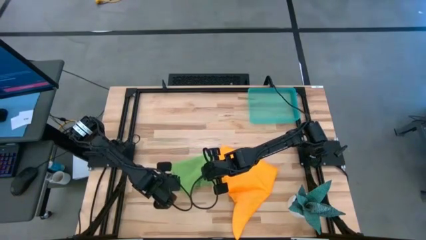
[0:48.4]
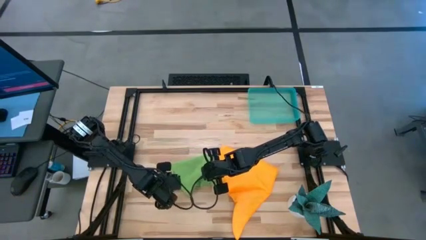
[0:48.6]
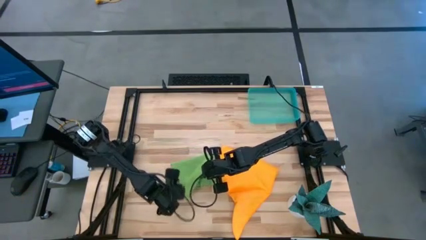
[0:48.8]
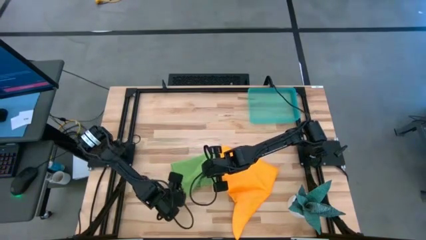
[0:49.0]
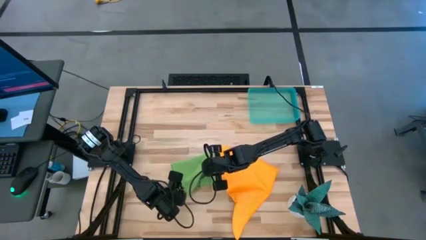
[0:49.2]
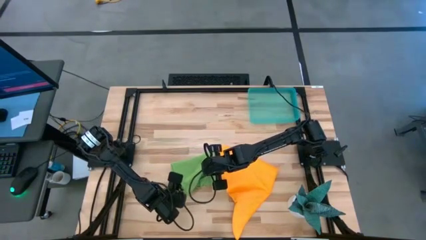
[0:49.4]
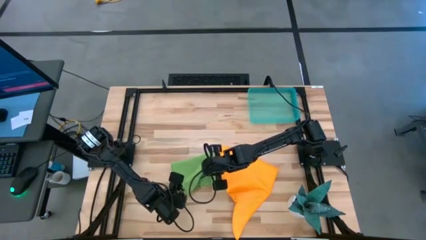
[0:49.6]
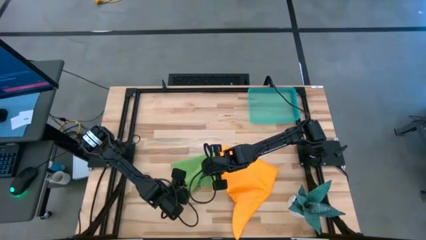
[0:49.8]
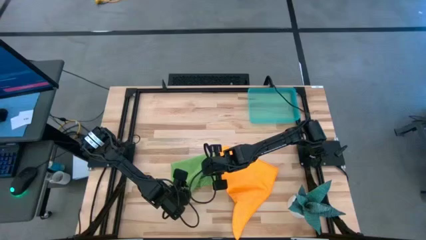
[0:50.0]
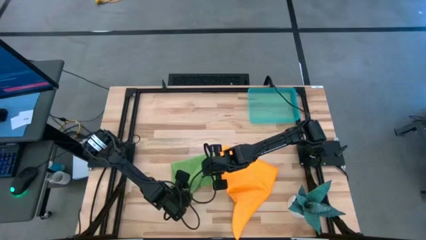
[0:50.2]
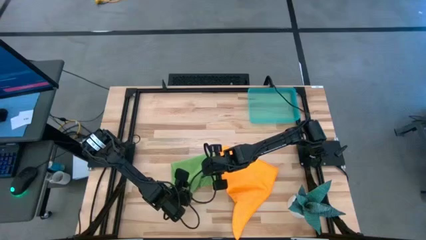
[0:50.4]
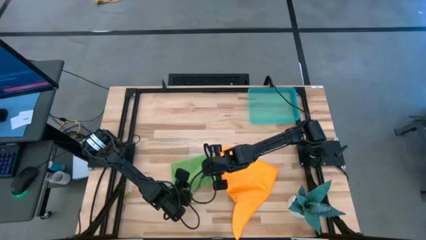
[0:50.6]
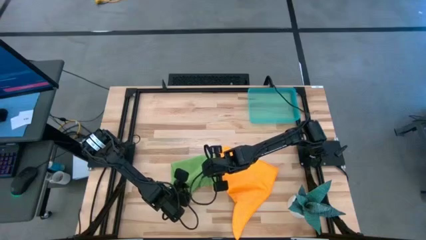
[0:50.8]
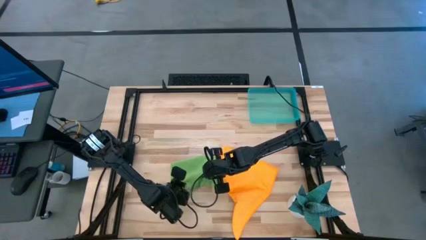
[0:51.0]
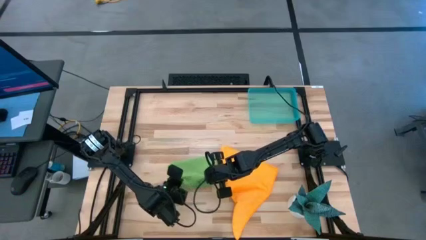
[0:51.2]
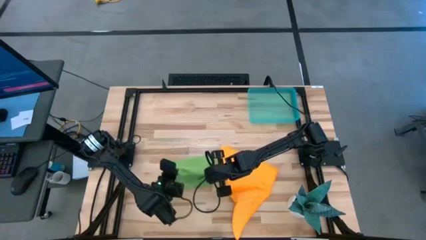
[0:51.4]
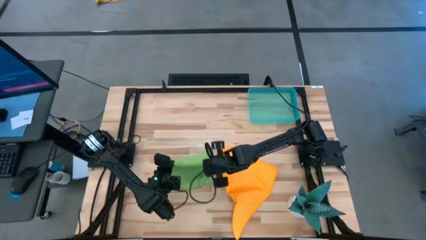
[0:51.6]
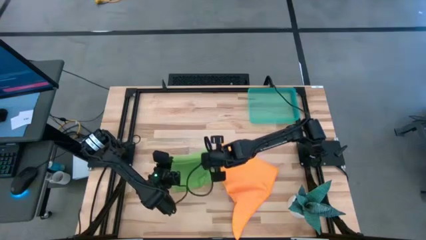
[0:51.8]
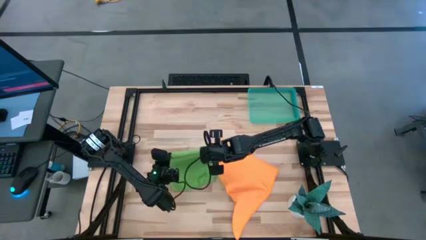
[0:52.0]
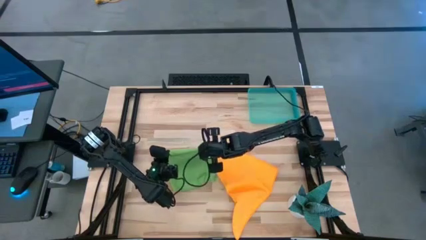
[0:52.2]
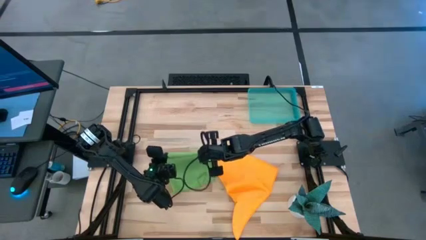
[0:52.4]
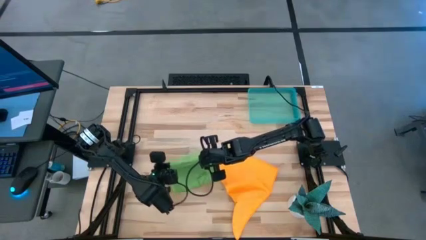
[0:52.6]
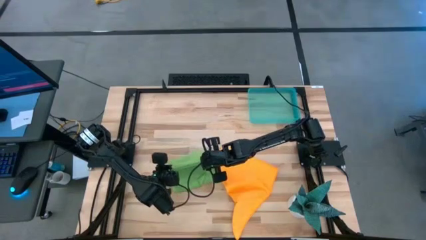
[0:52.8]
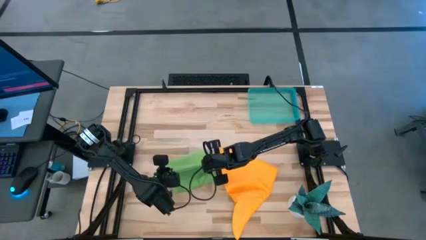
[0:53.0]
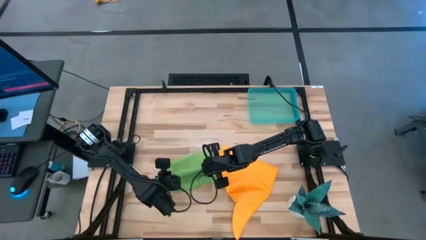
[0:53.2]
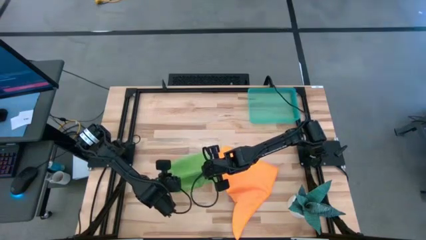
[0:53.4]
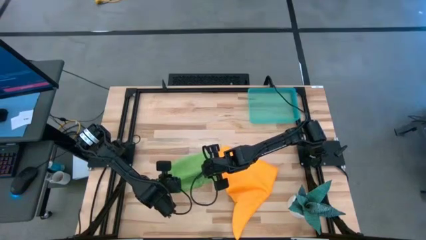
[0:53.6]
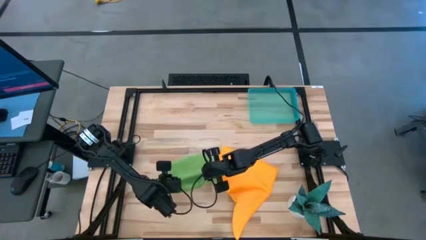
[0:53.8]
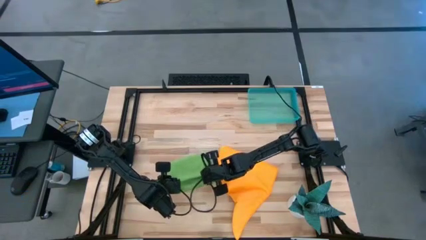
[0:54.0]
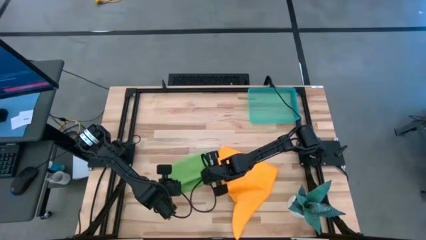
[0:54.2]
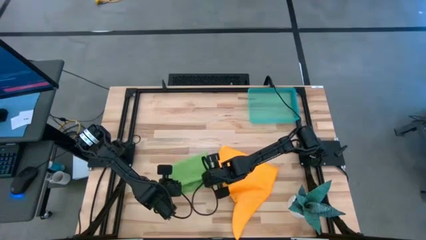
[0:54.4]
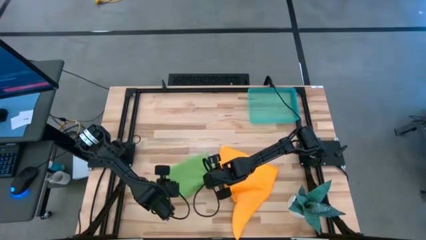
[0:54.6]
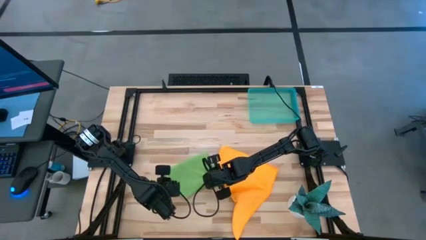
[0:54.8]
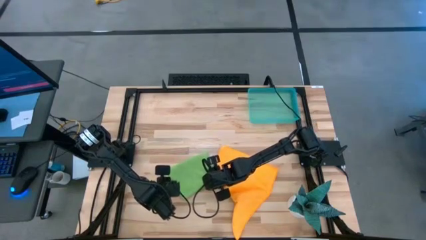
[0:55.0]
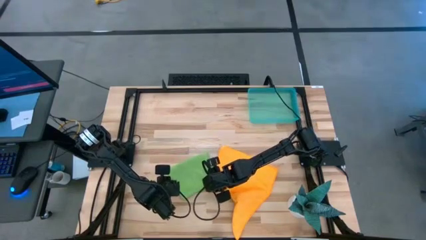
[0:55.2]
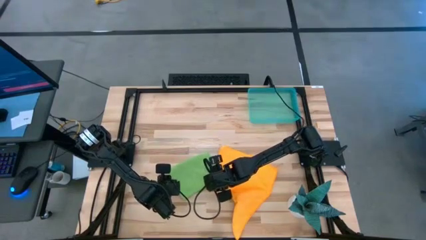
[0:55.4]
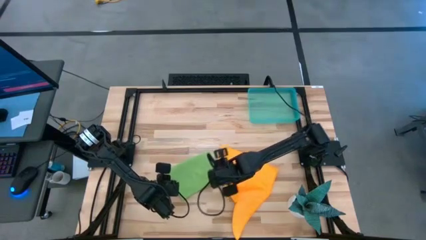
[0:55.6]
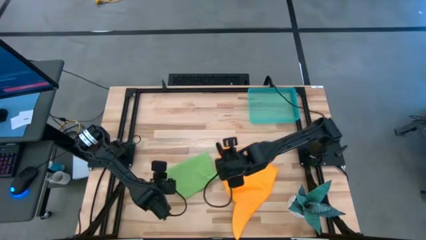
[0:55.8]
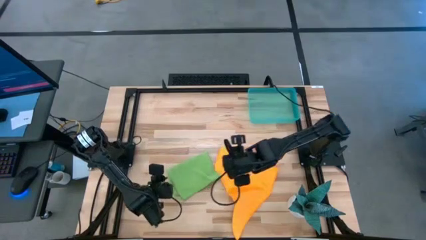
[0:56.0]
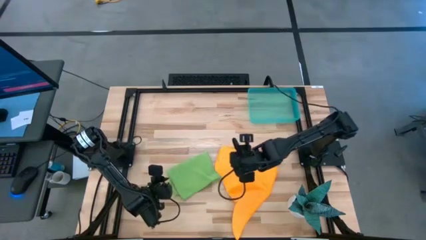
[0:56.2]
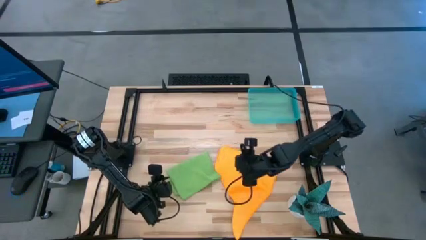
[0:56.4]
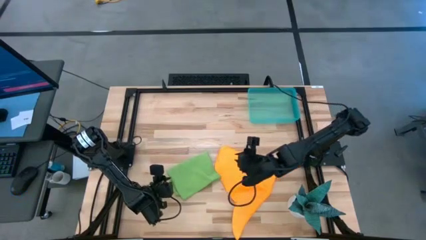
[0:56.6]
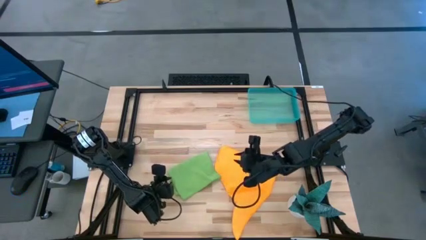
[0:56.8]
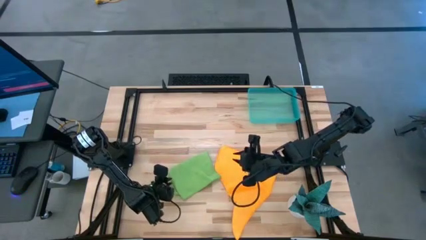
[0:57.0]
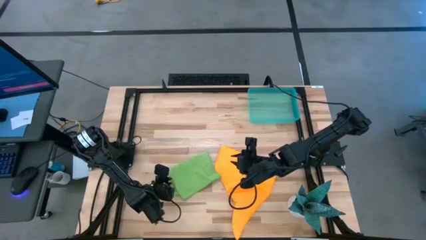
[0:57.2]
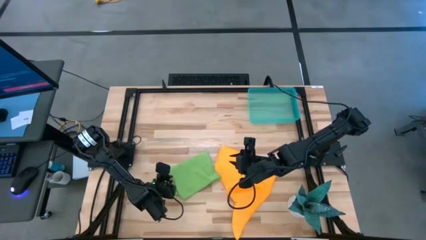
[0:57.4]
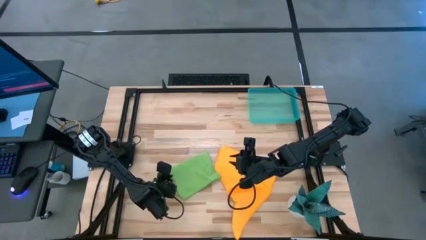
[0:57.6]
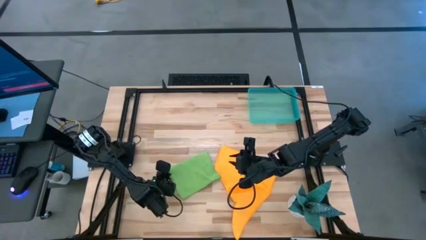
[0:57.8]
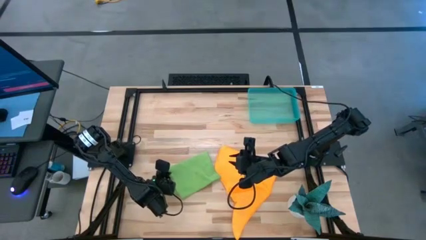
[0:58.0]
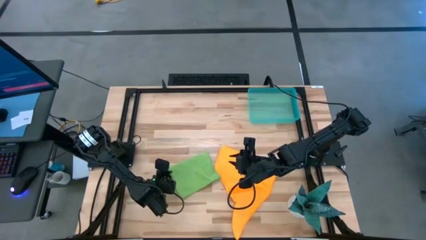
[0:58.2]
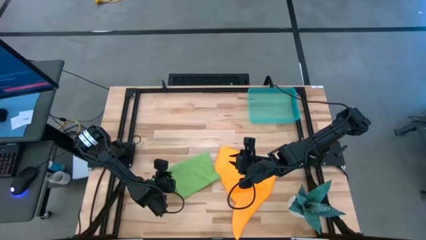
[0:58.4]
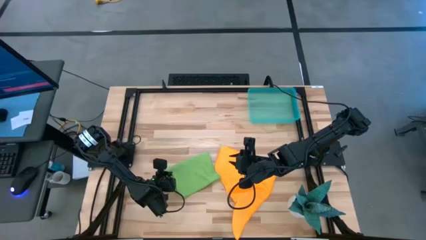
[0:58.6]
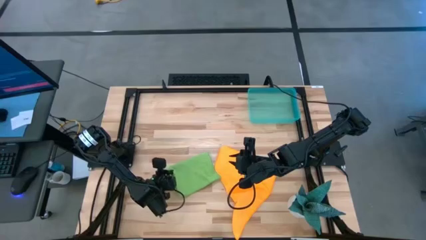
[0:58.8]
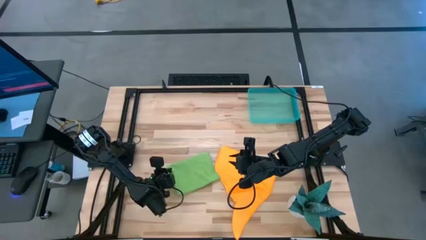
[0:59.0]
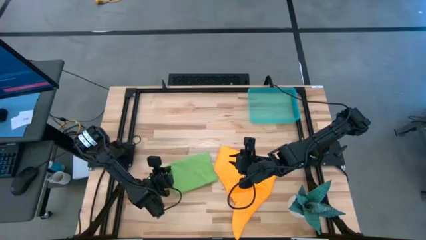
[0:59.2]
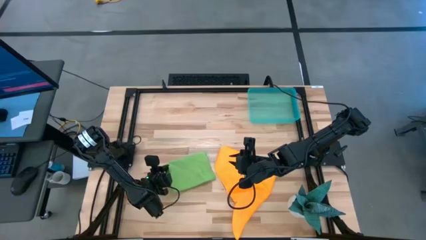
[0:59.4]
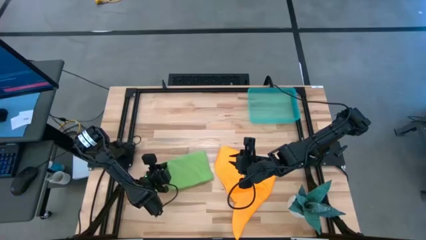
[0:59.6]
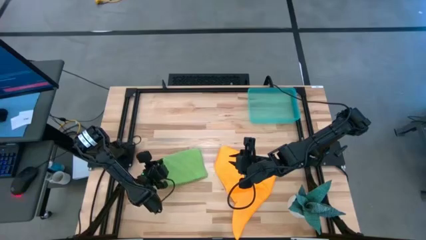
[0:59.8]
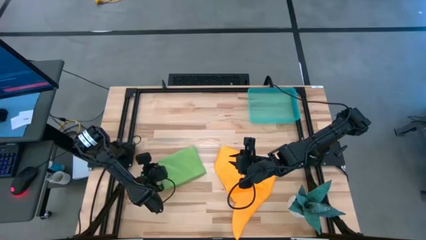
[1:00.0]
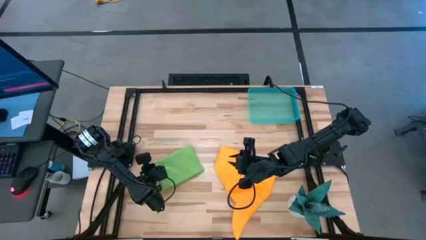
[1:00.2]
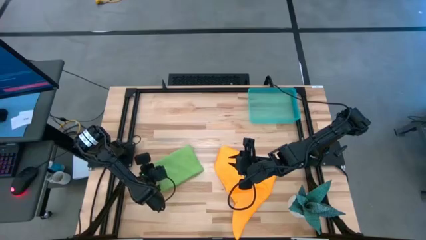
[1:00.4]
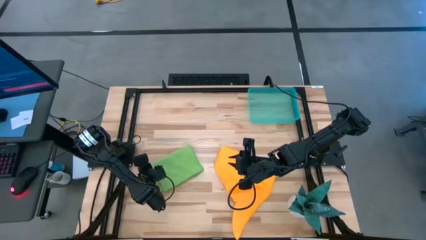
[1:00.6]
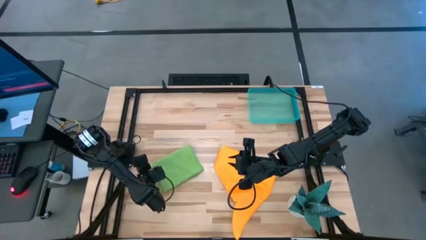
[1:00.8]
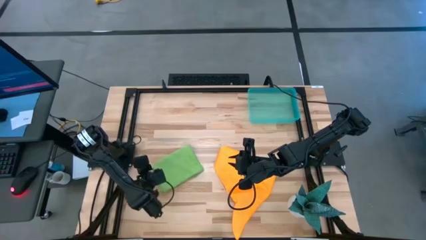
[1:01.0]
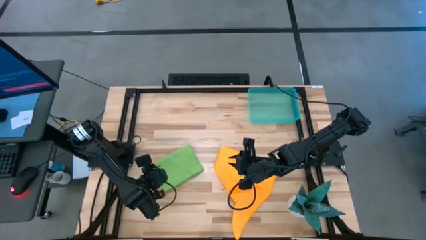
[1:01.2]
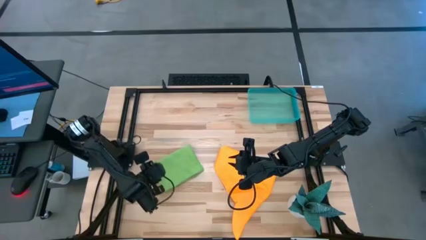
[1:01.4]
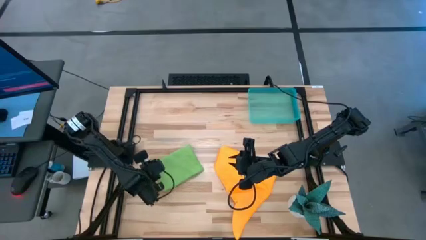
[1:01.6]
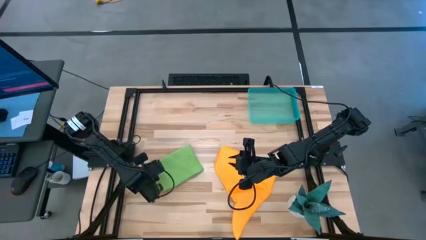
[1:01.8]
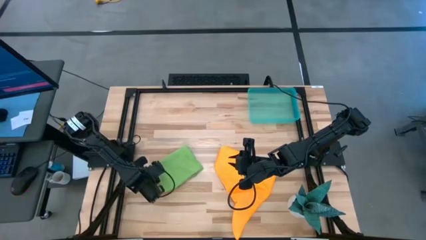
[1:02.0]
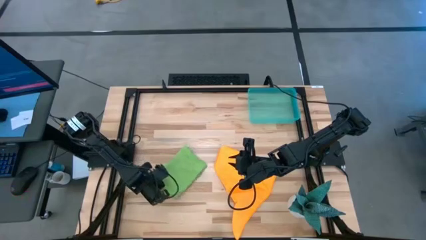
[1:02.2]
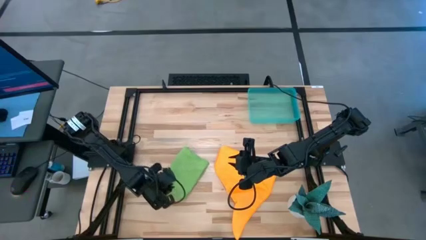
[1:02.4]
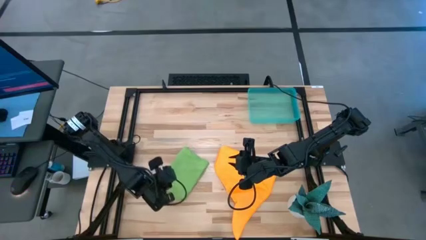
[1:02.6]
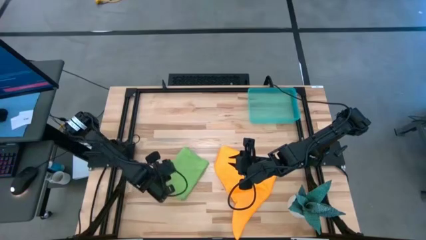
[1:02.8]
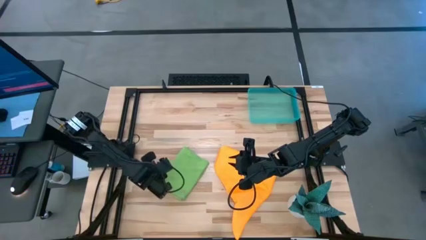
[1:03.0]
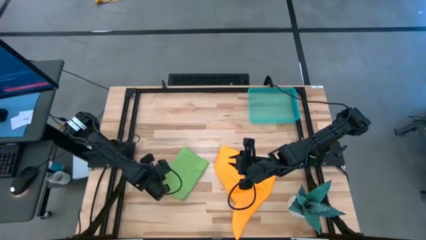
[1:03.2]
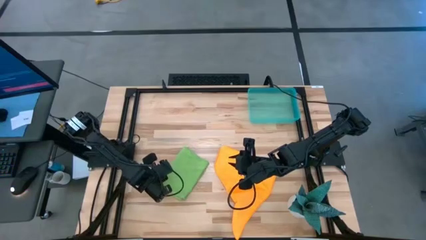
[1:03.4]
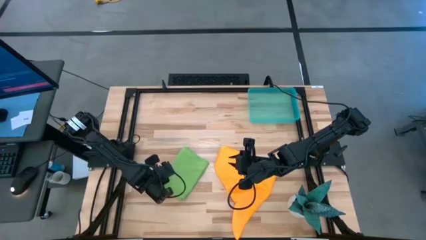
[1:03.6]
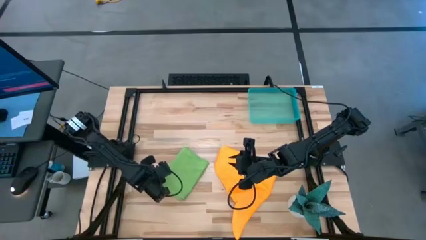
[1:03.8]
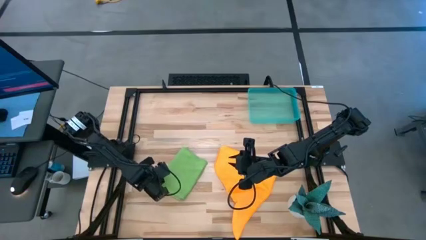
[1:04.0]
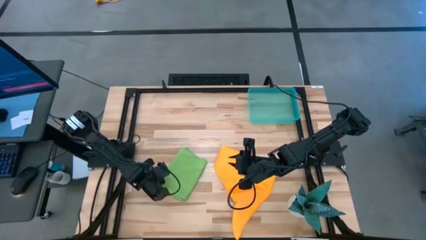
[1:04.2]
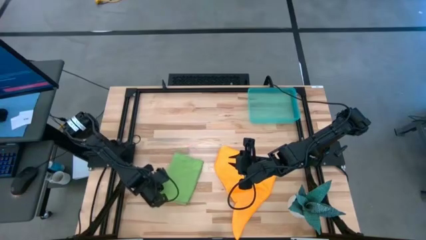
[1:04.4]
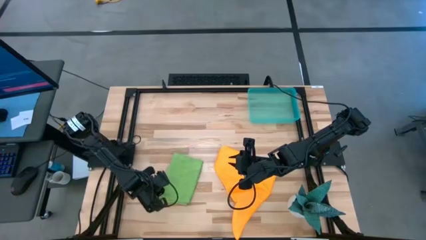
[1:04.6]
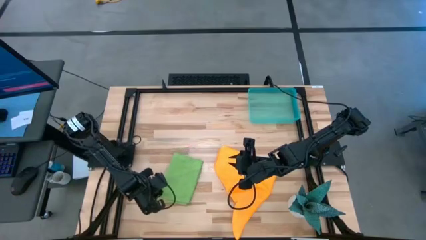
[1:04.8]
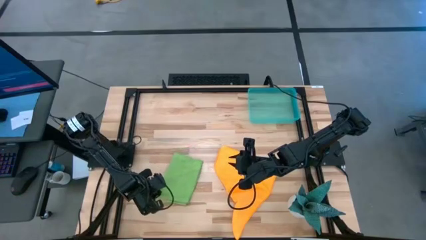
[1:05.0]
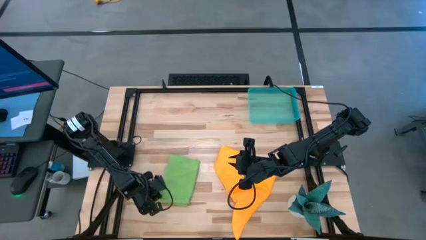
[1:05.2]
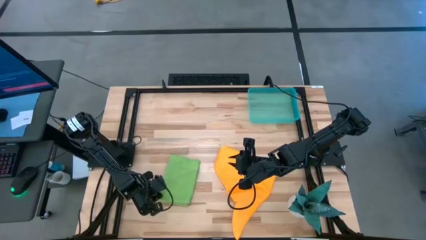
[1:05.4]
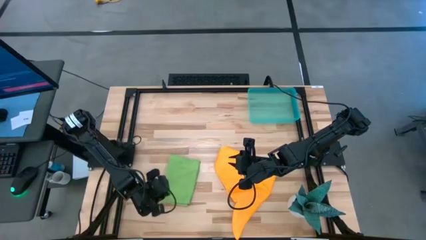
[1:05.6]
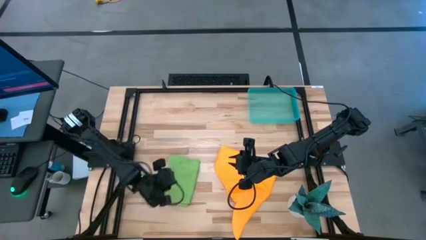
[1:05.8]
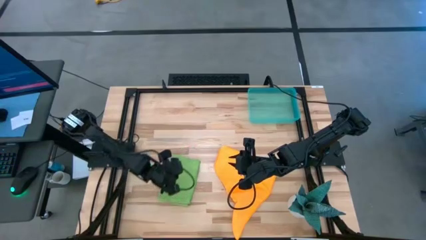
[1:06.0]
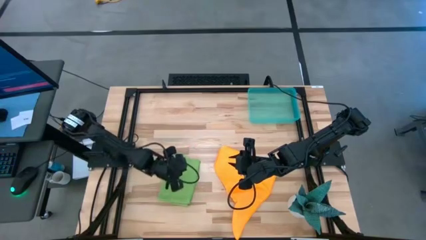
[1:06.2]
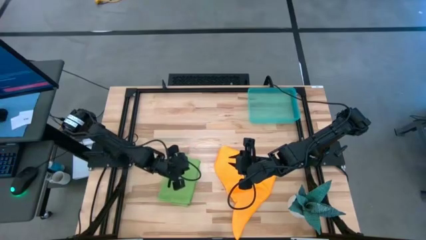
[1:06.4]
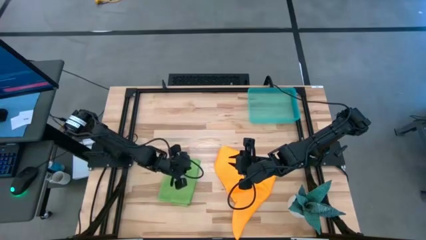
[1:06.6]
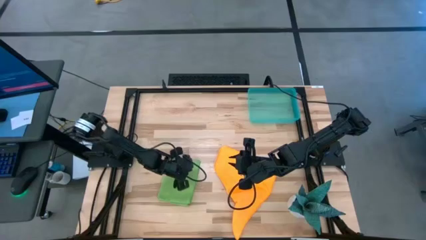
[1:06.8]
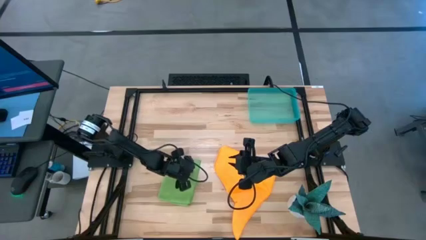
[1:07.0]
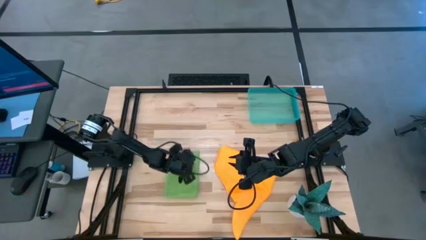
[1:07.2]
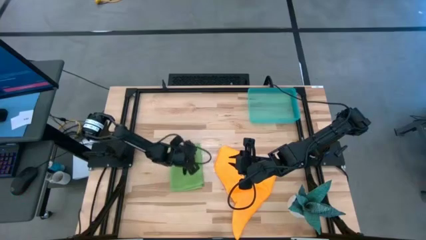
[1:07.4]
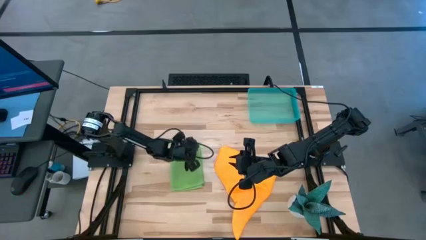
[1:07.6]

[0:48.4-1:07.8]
Task: Roll microfiber towels into tight, uniform cylinder then place into a basket
Fold the green microfiber towel
